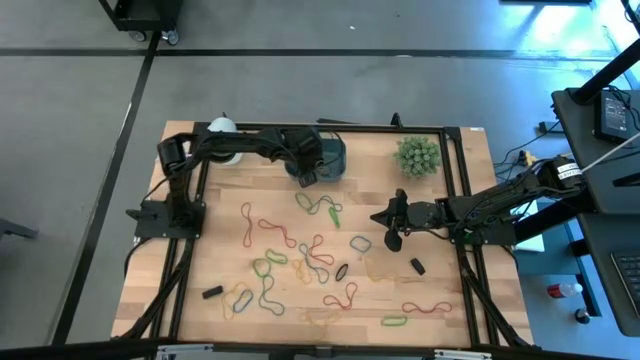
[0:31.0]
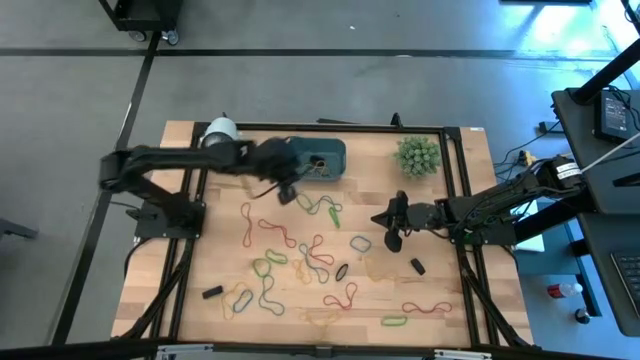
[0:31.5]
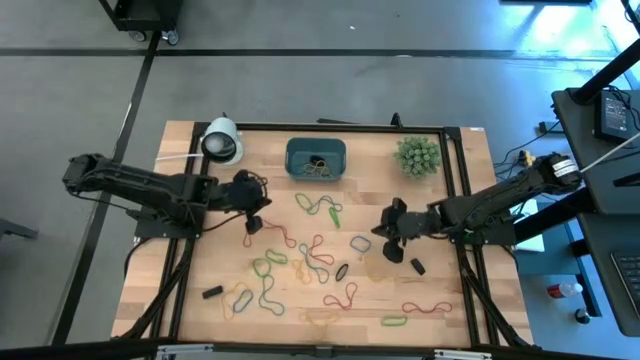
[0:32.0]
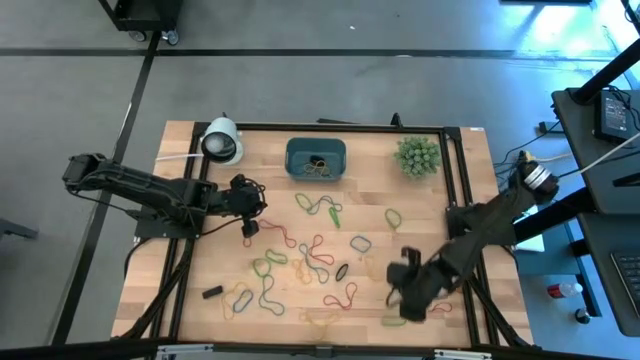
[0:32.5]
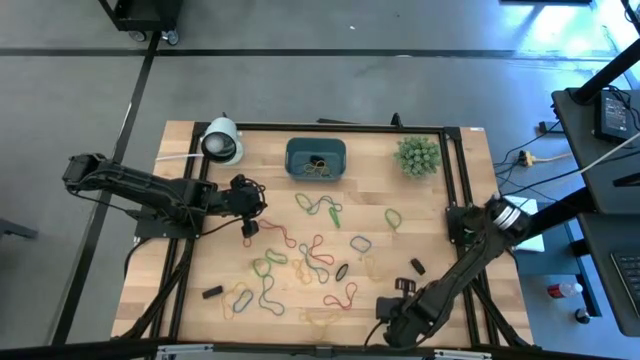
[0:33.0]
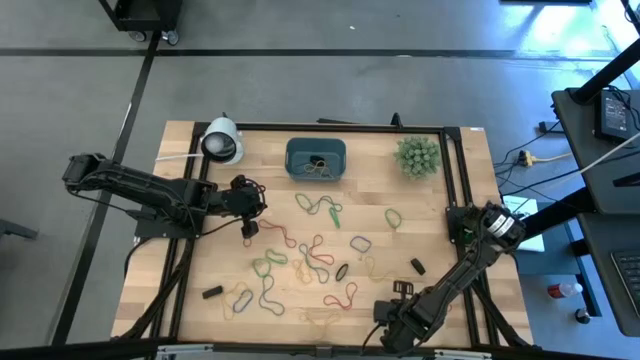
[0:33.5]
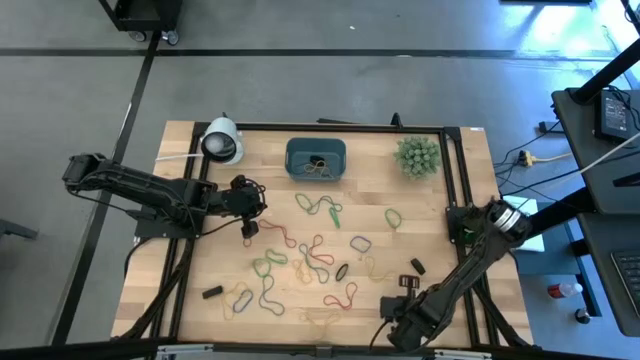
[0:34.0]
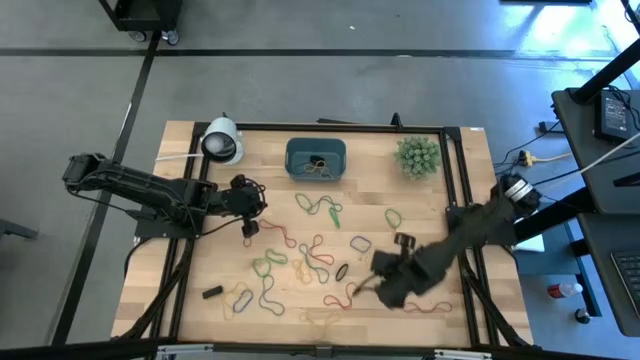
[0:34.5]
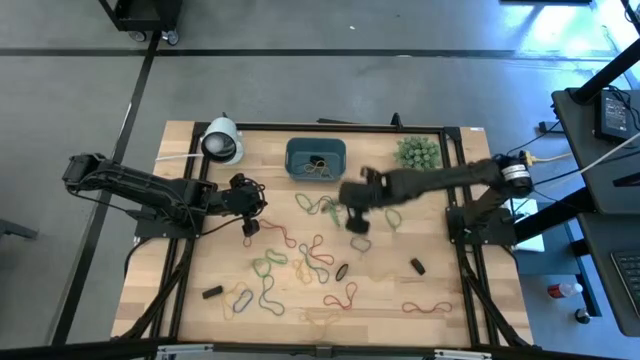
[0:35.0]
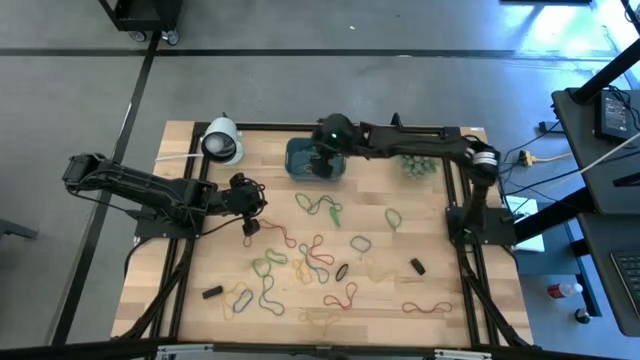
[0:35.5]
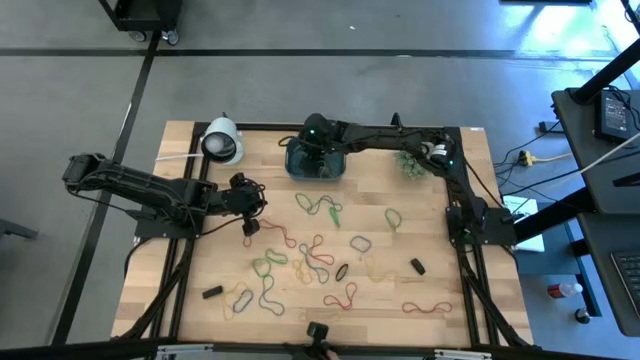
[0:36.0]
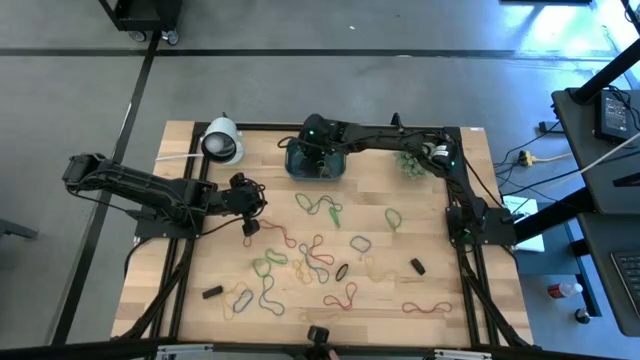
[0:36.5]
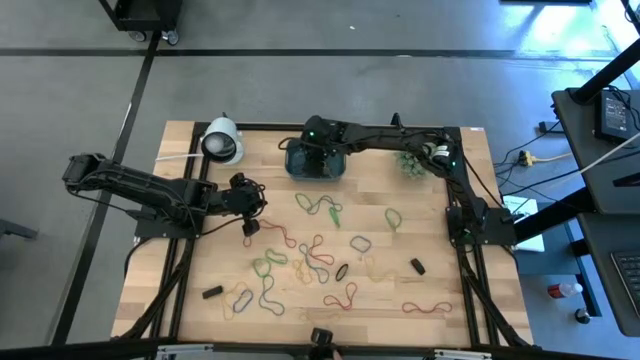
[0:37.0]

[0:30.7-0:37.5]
Task: Pick and place rubber bands into bin
Put the green rubber band into the blue bin

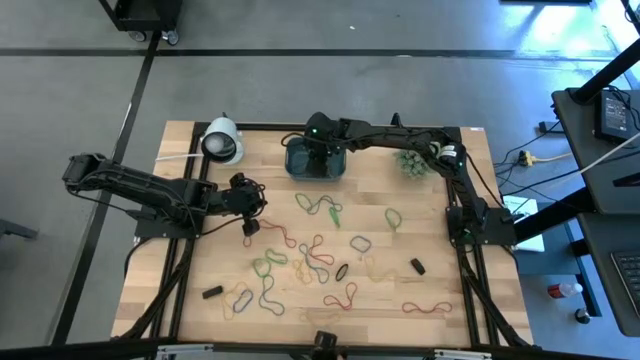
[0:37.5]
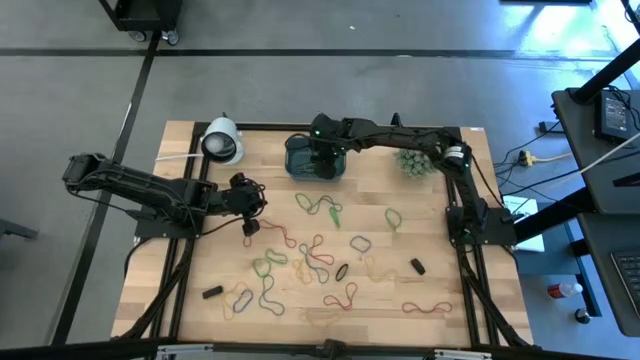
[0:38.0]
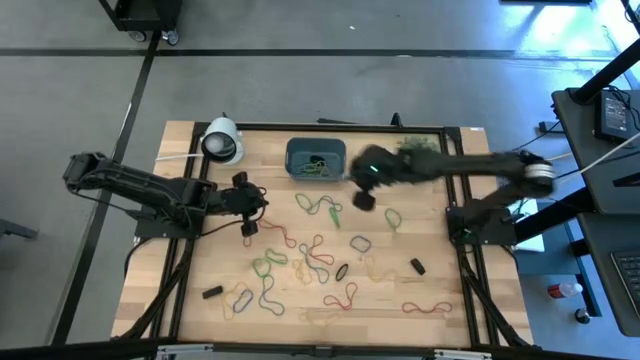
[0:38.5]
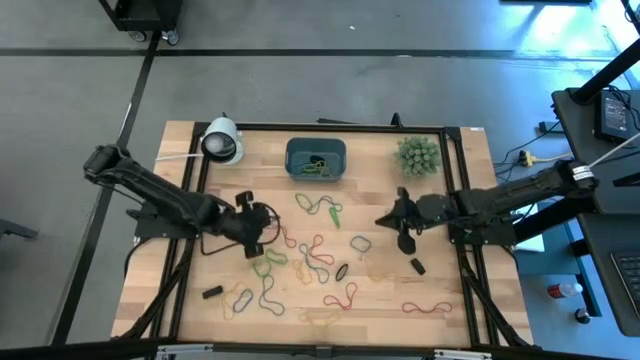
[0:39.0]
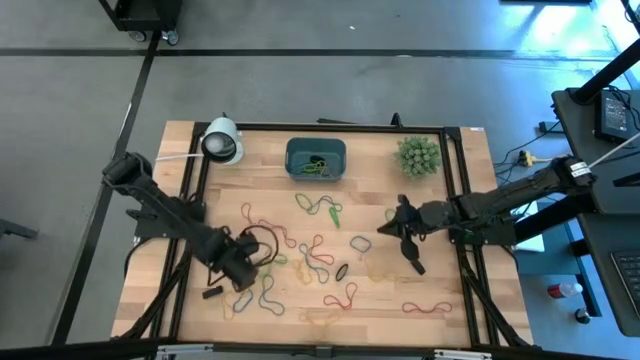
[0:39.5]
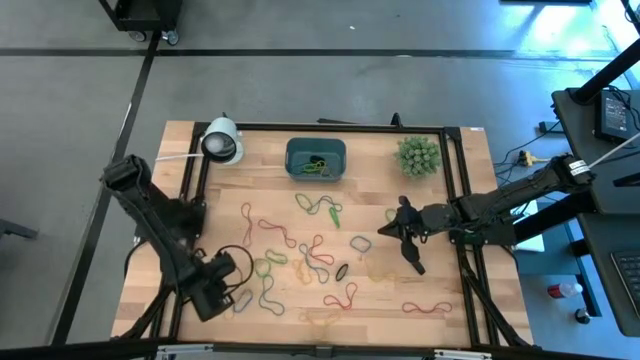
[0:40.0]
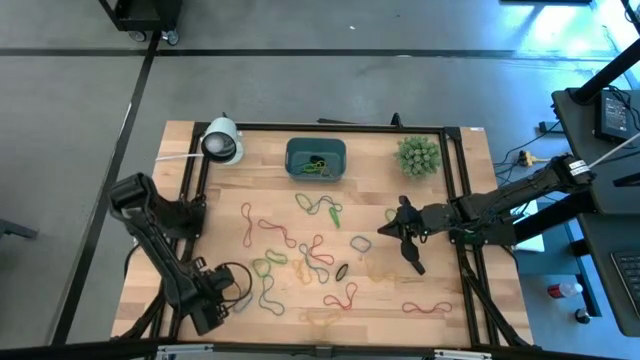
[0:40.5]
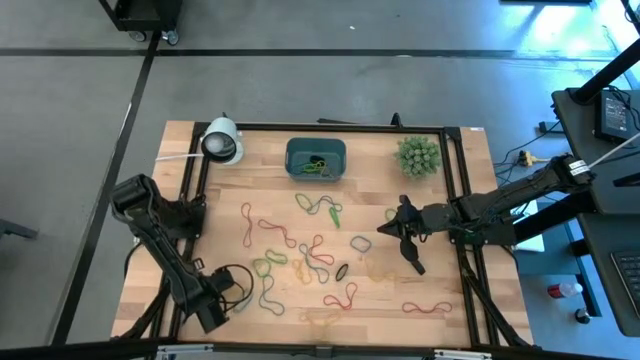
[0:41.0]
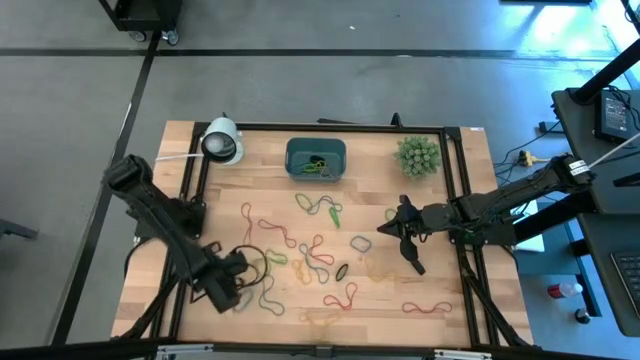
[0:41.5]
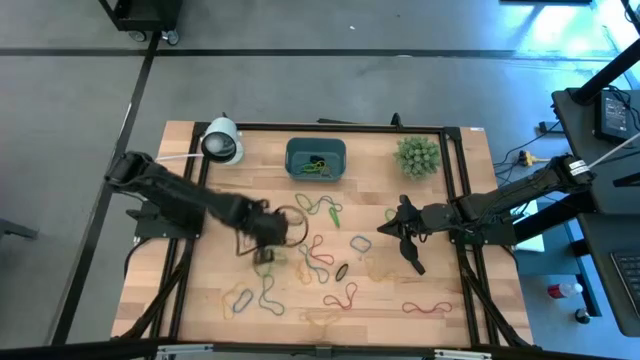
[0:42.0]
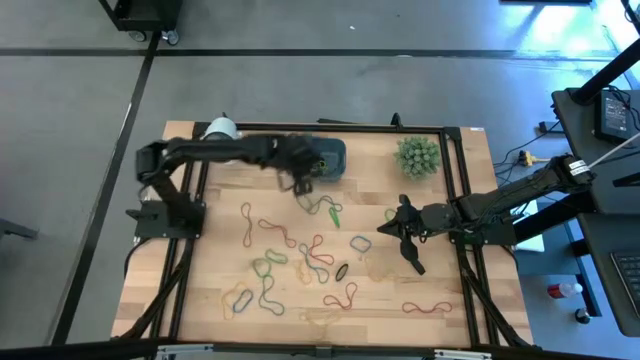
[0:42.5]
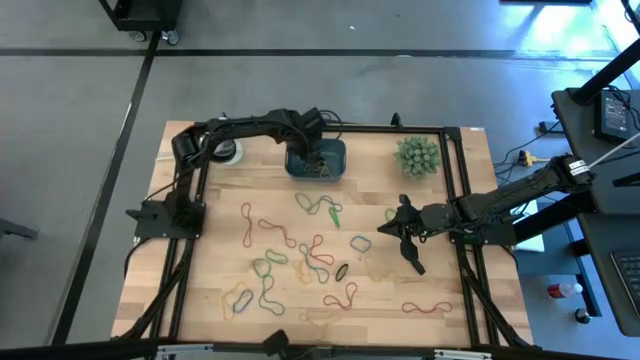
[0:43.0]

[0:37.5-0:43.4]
Put the black rubber band into the blue bin

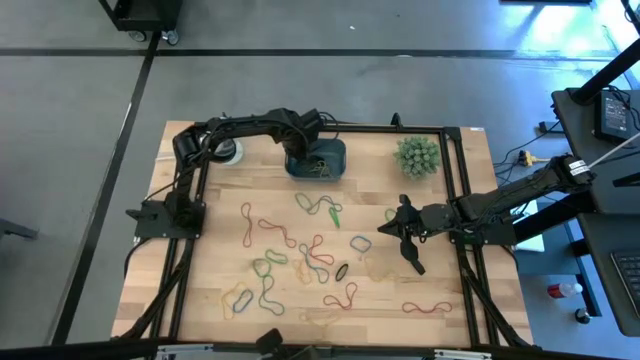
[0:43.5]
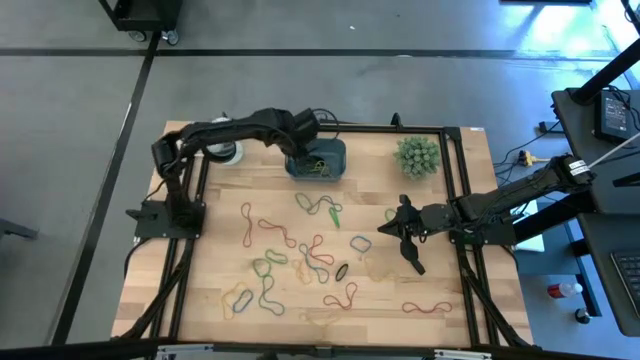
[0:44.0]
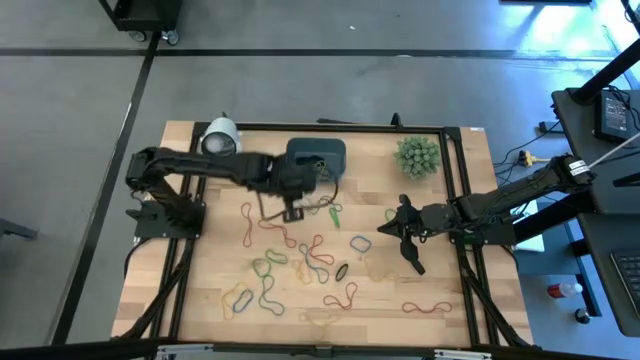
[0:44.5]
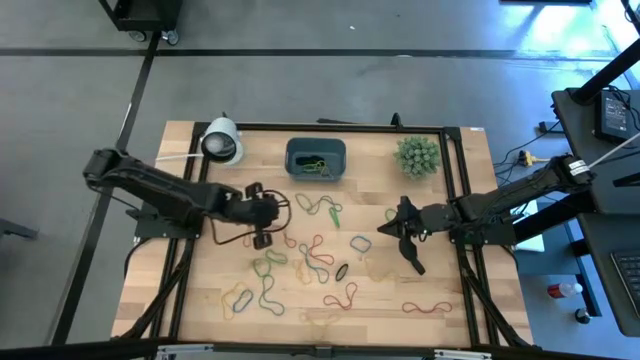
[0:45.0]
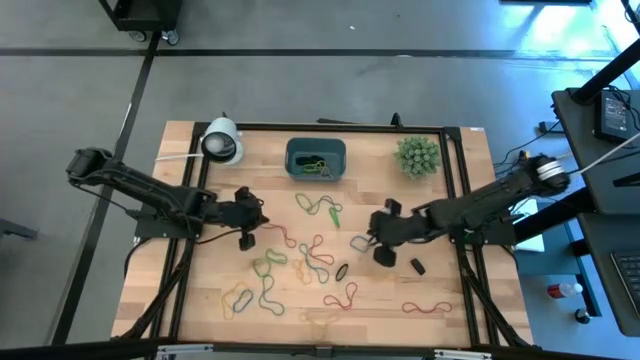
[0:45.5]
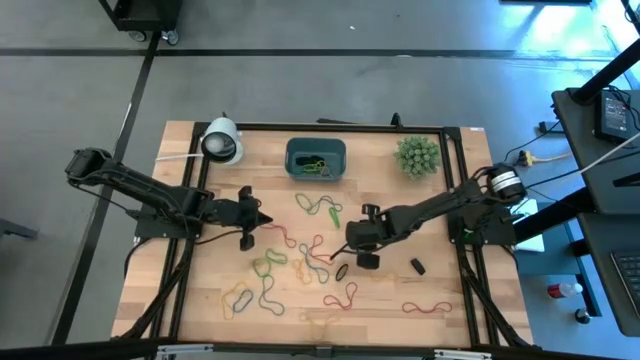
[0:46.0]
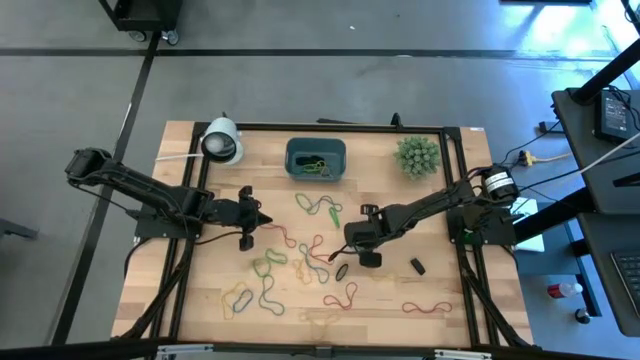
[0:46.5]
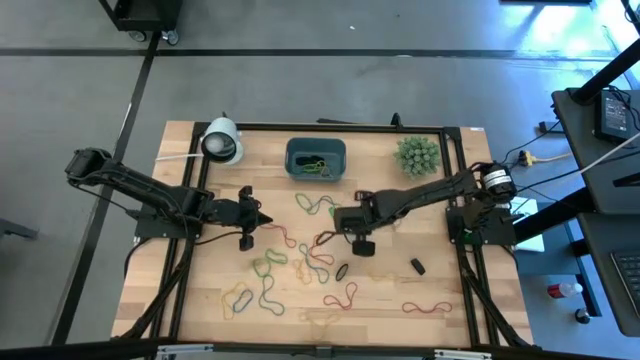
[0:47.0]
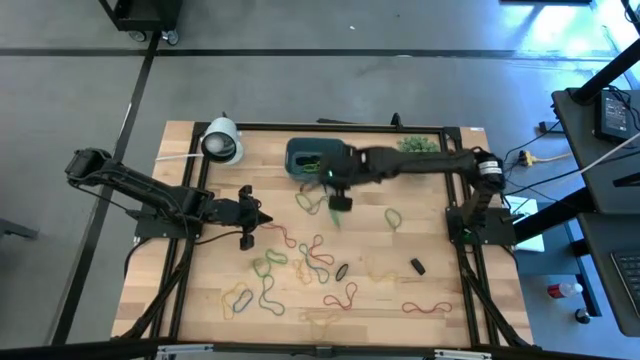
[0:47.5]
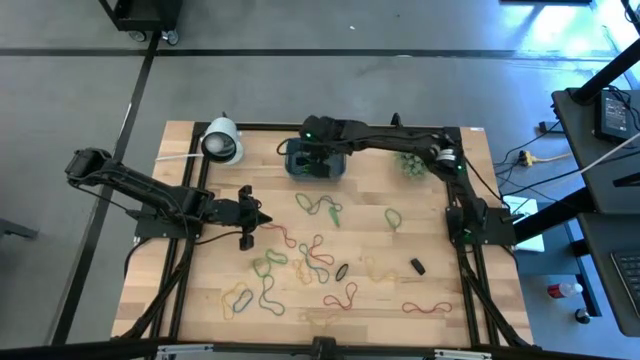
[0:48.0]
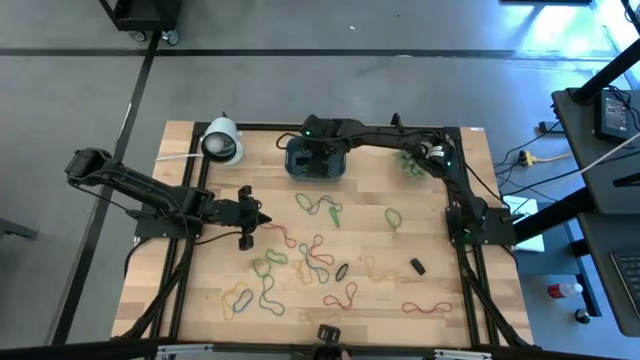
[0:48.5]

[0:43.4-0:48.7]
Put the blue rubber band into the blue bin

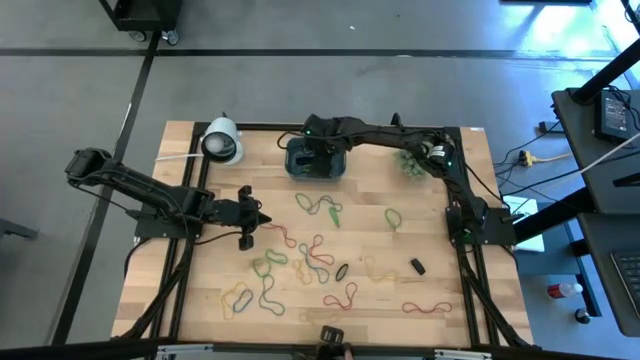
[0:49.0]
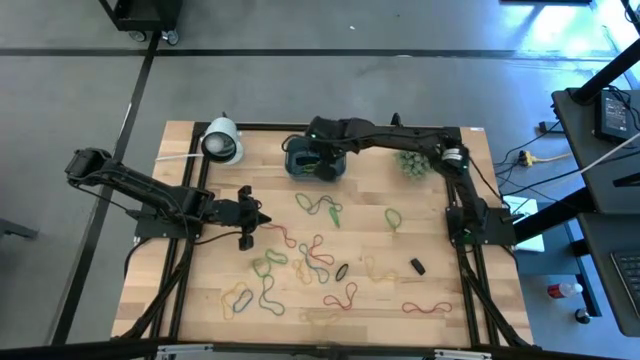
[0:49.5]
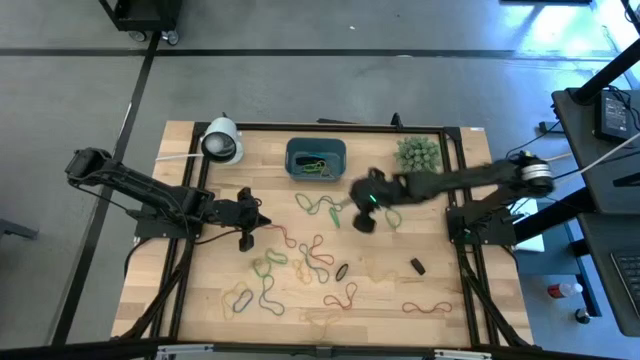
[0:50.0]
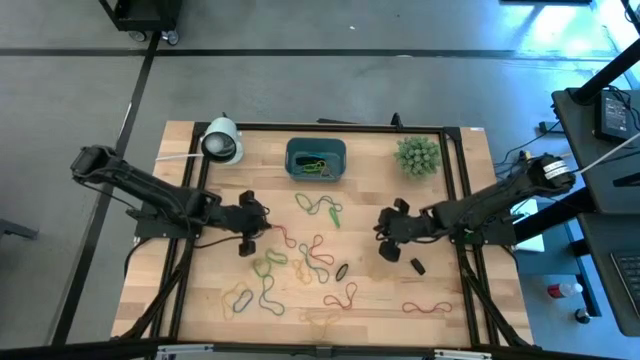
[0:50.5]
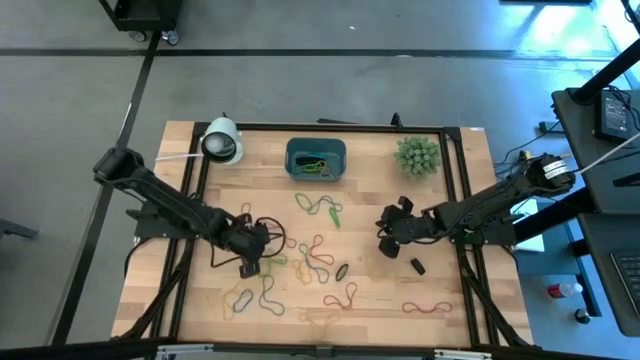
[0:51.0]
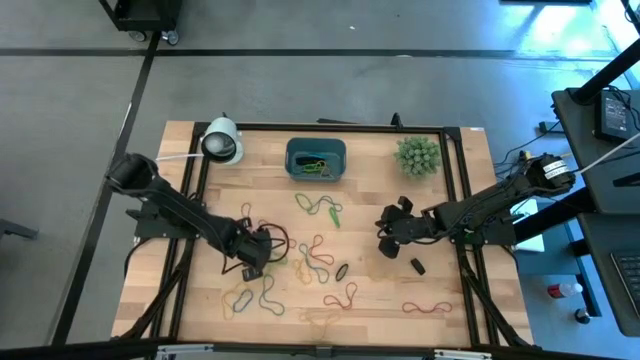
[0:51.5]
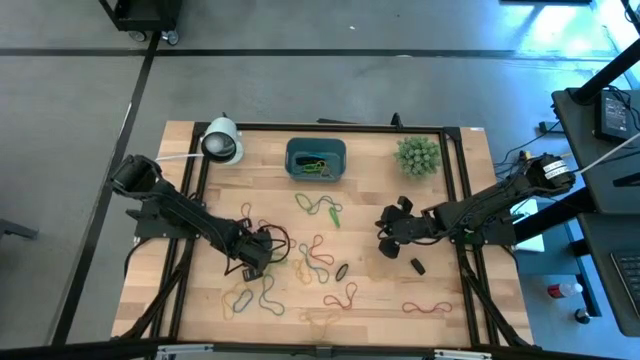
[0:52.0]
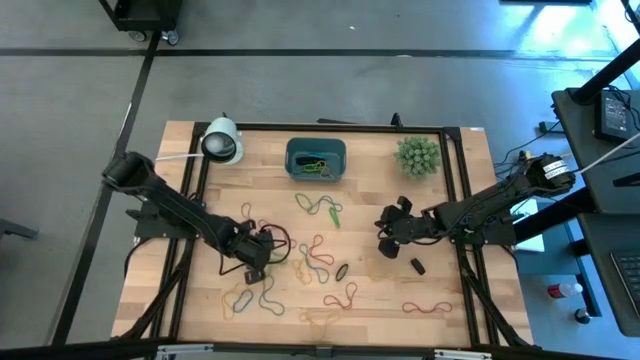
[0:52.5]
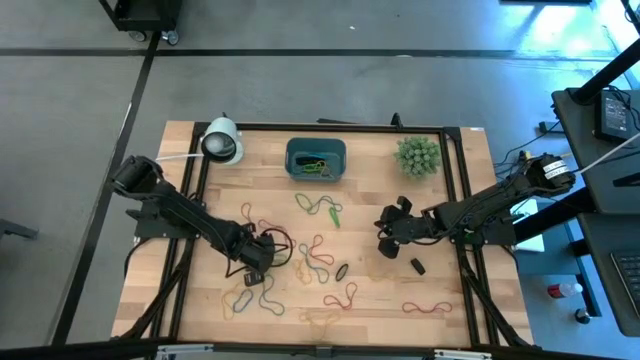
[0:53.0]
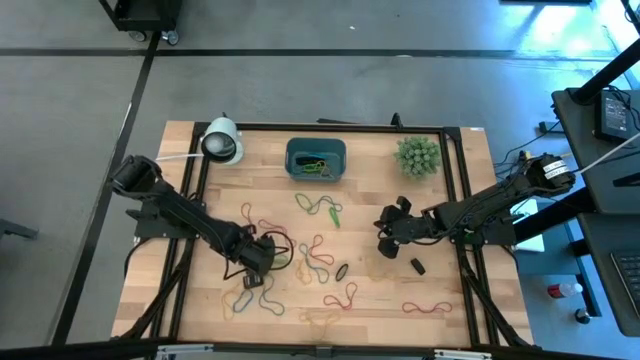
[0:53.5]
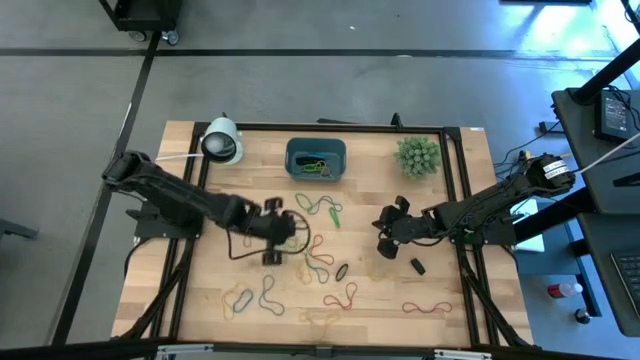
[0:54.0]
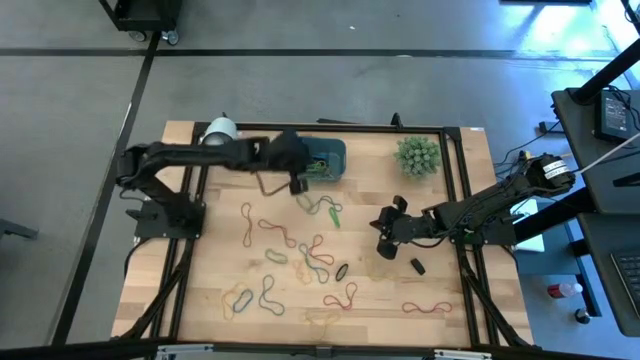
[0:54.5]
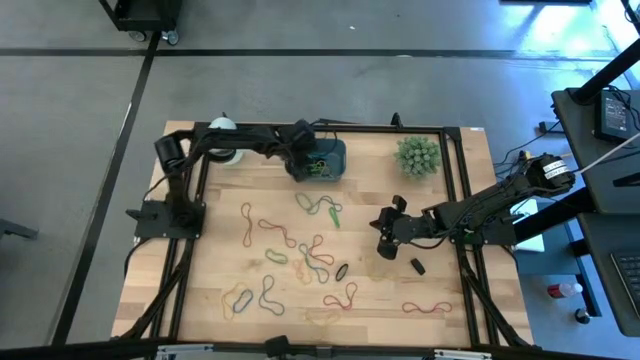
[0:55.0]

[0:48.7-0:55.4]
Put the green rubber band into the blue bin
